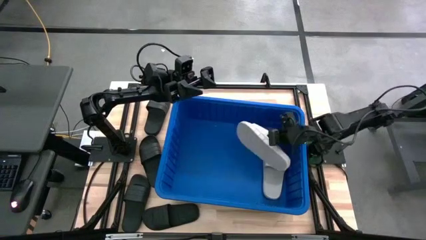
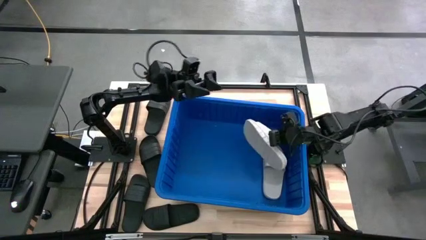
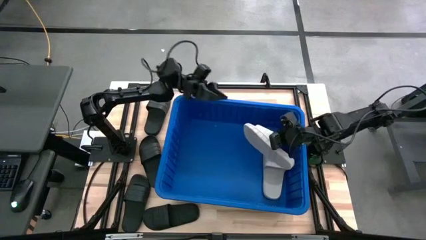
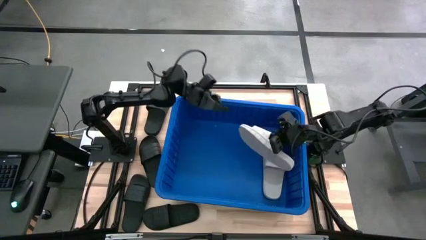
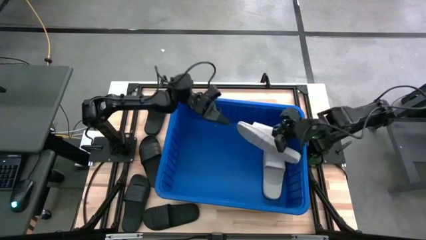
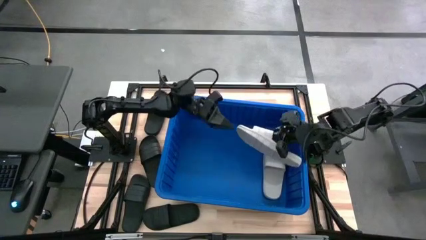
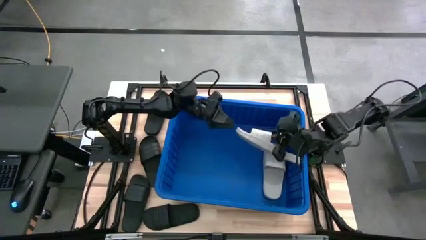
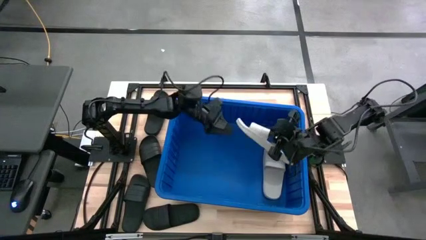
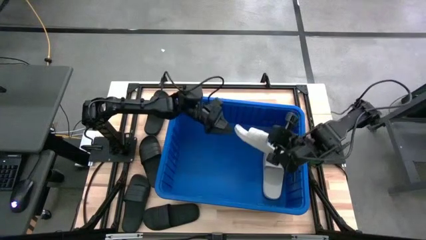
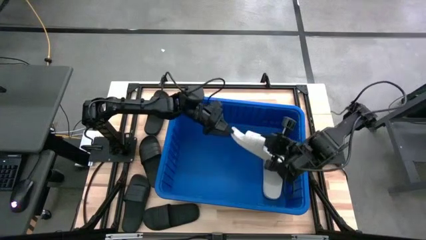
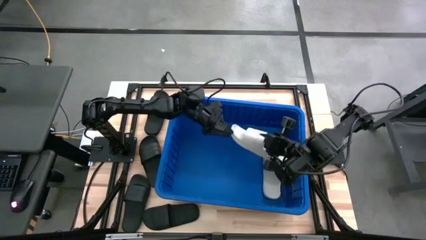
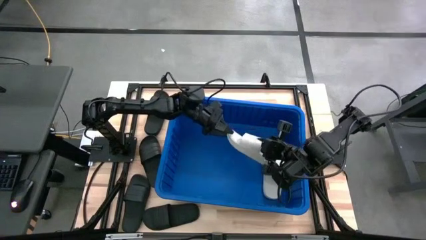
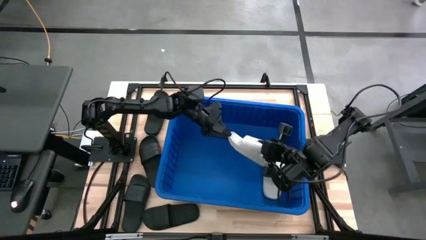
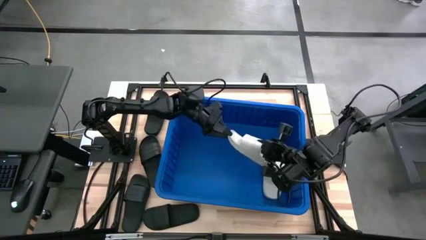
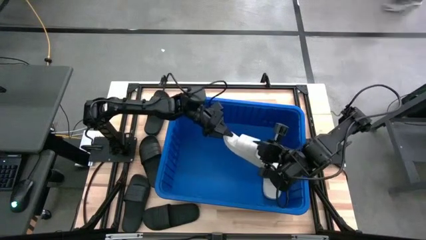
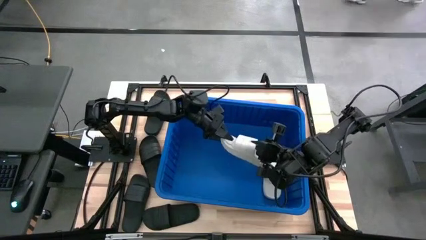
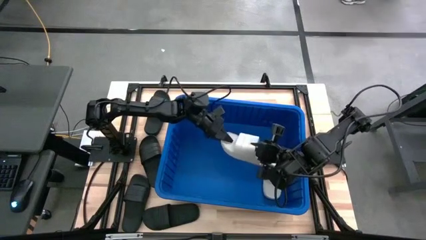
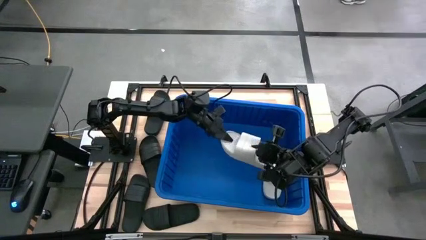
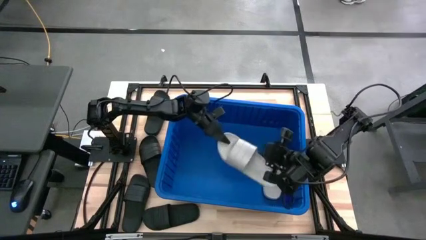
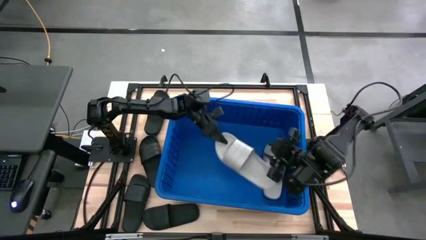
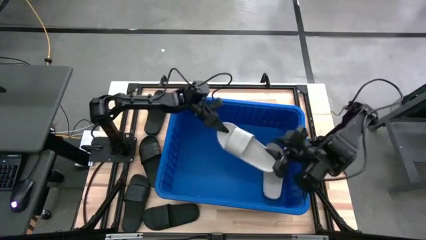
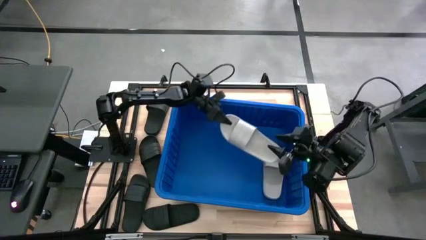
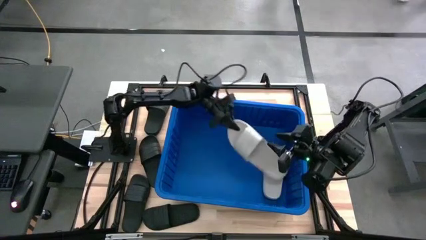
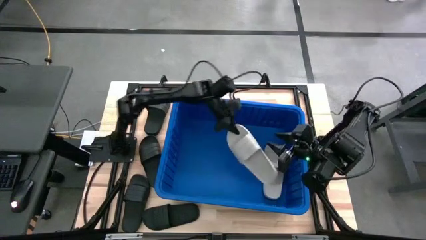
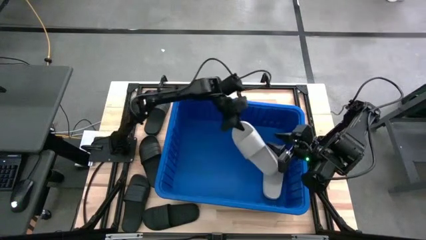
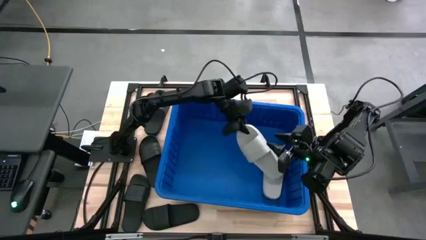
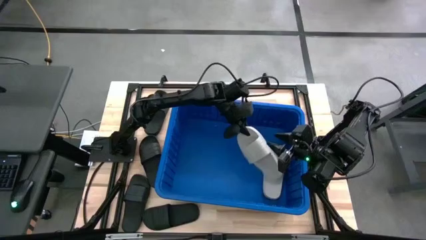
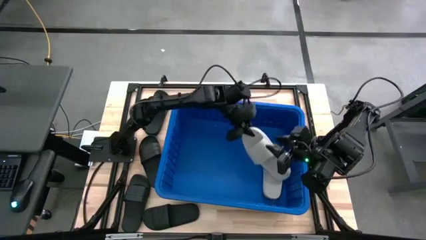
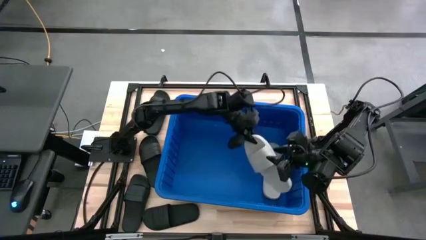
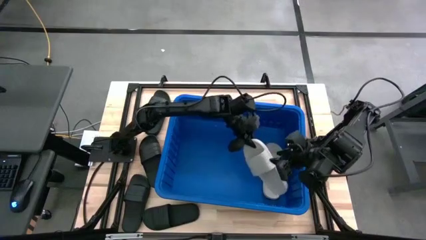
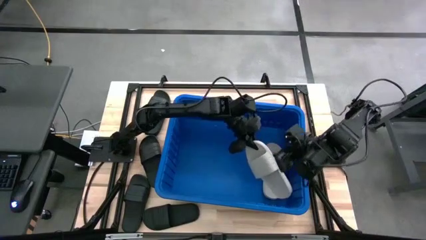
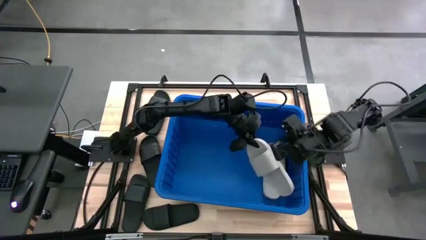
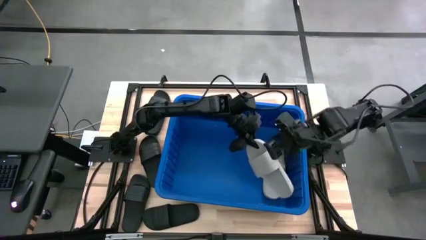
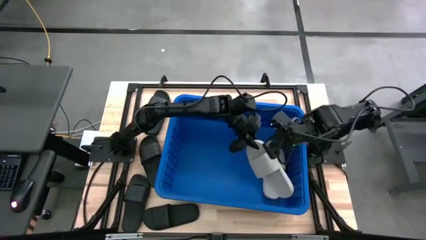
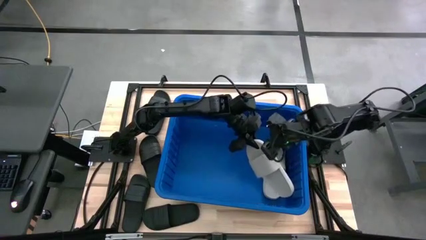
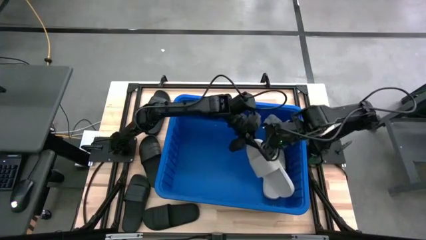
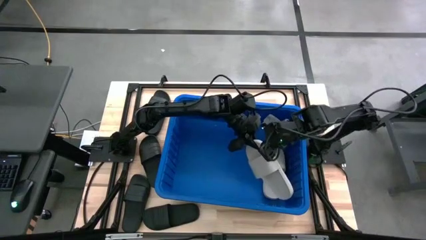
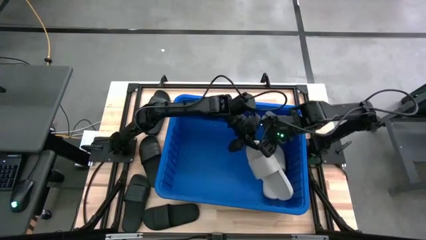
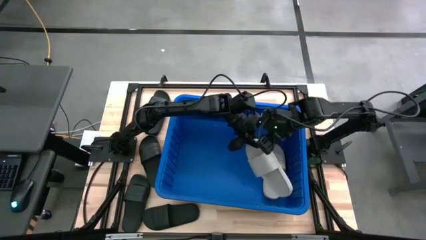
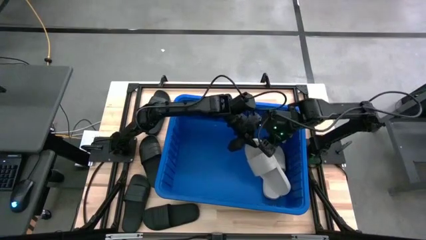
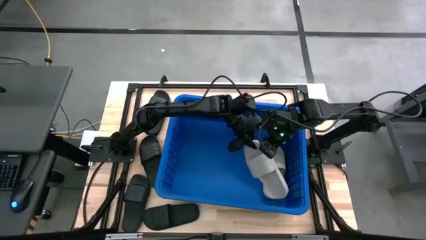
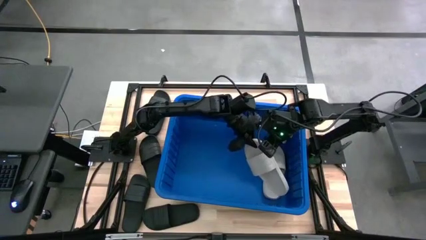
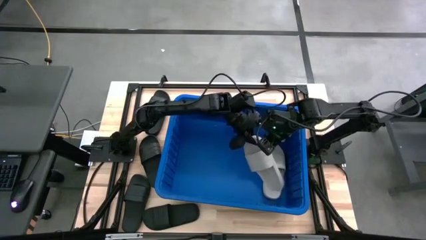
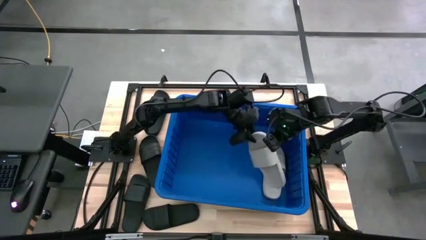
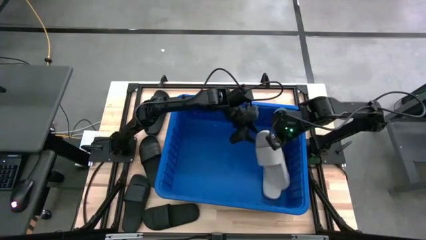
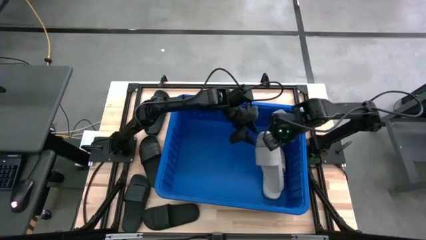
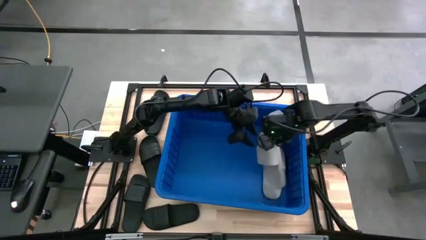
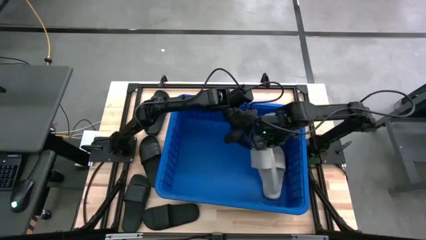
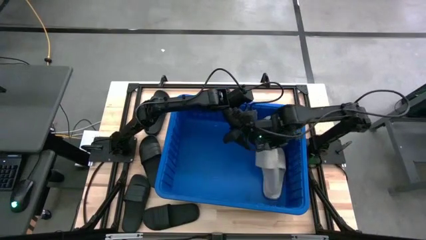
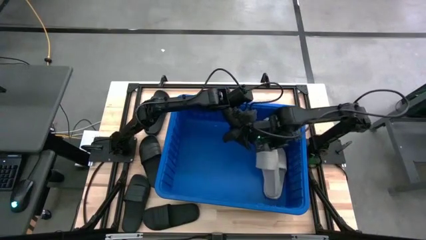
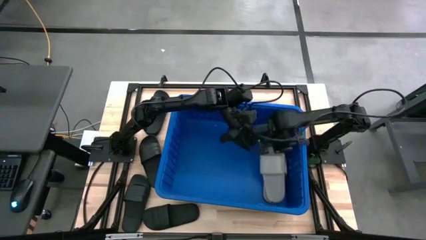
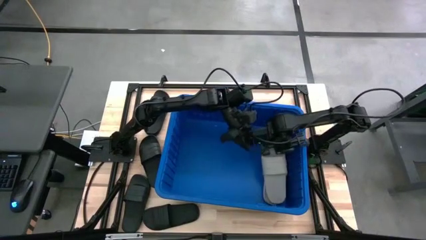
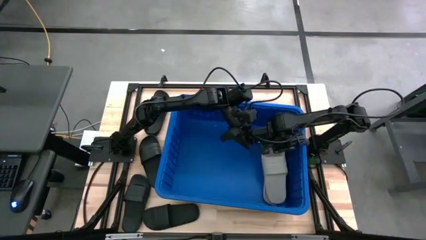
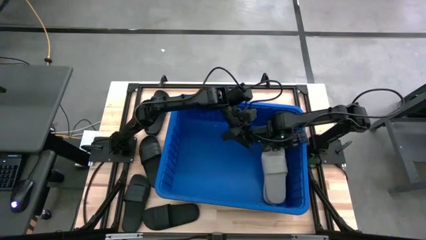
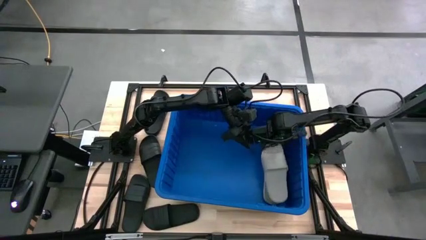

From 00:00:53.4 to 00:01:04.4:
Task: Pick and place slides into bin
Put the gray slide into the blue organizer bin
